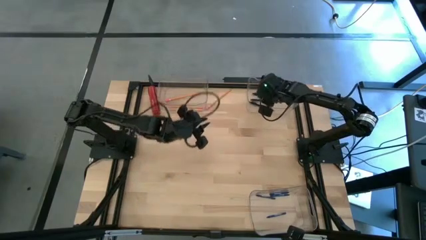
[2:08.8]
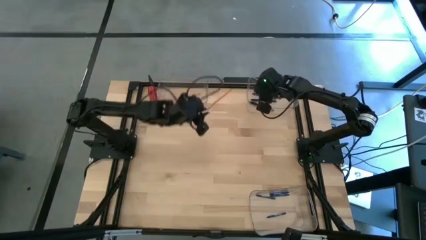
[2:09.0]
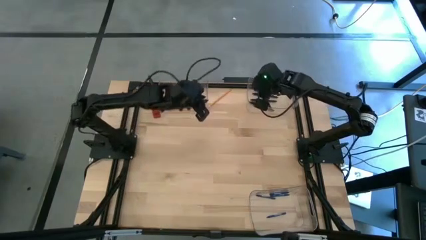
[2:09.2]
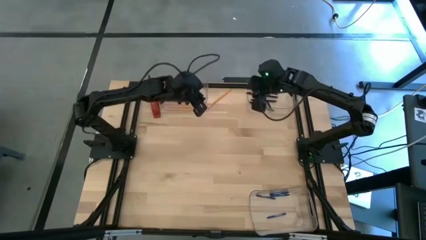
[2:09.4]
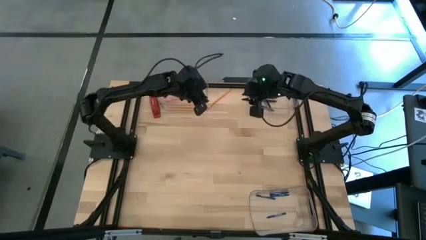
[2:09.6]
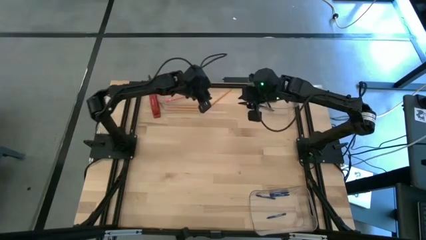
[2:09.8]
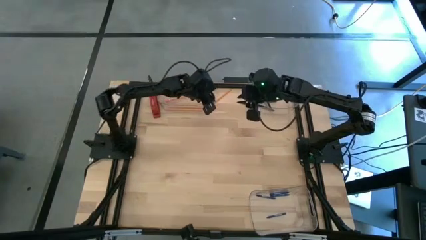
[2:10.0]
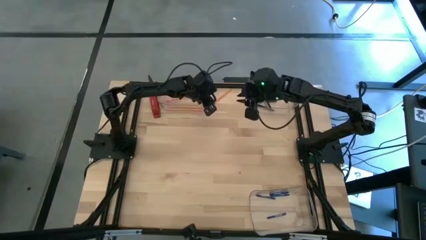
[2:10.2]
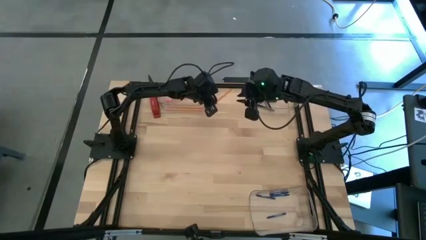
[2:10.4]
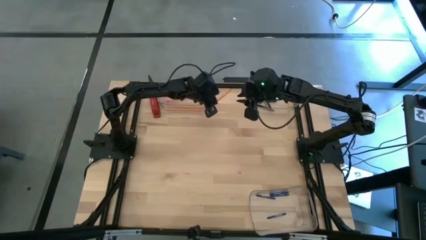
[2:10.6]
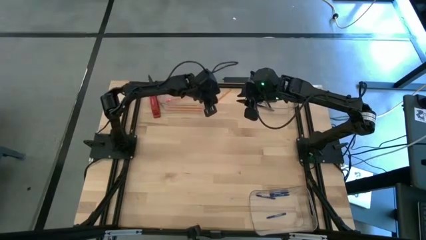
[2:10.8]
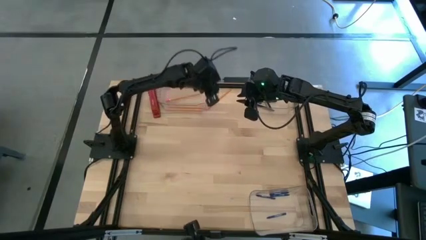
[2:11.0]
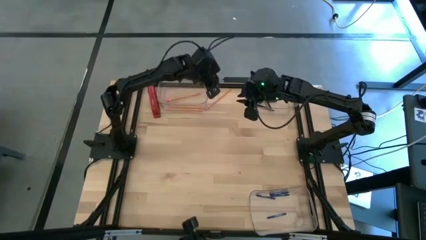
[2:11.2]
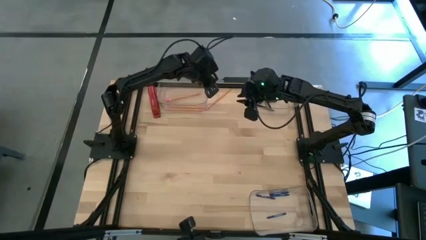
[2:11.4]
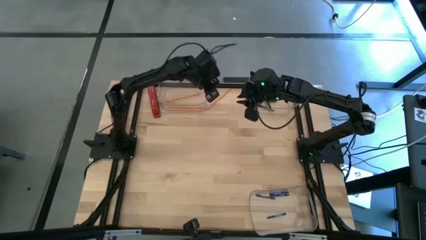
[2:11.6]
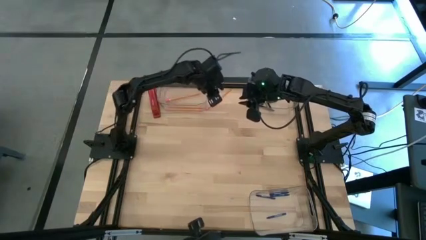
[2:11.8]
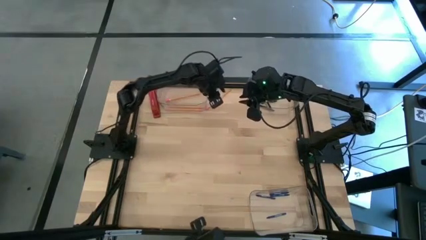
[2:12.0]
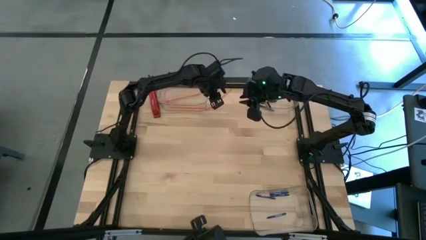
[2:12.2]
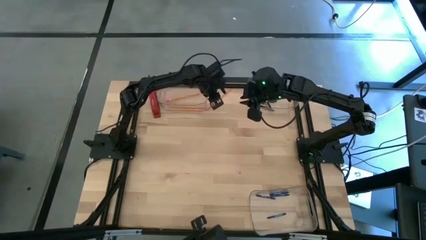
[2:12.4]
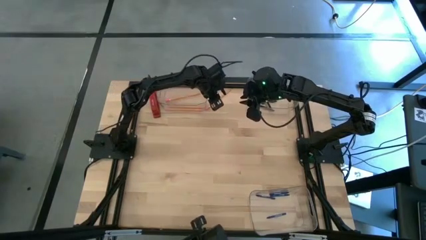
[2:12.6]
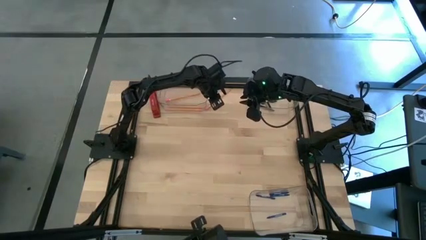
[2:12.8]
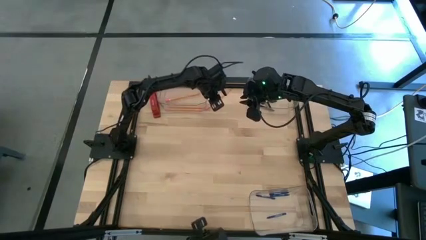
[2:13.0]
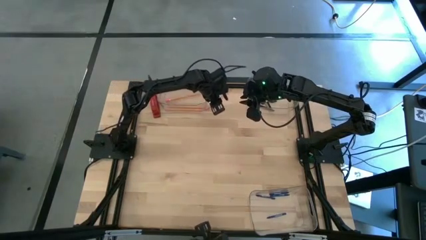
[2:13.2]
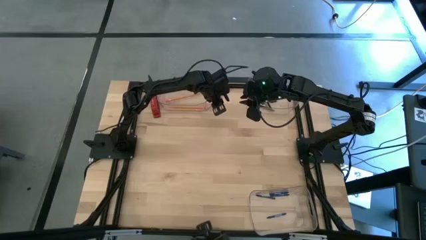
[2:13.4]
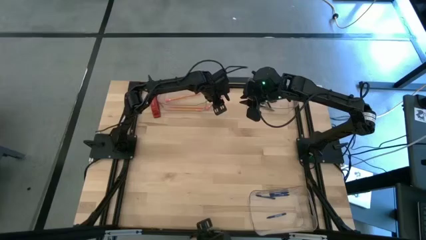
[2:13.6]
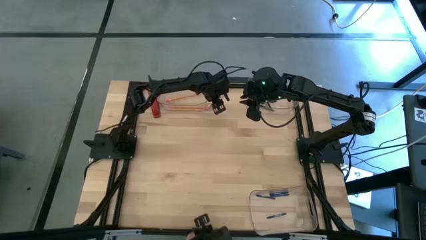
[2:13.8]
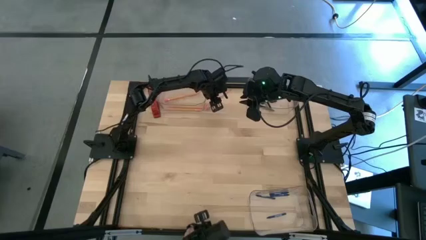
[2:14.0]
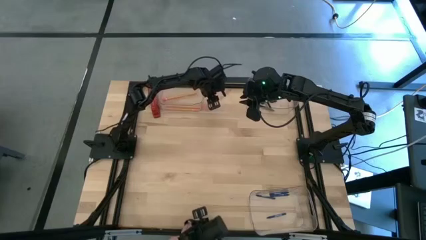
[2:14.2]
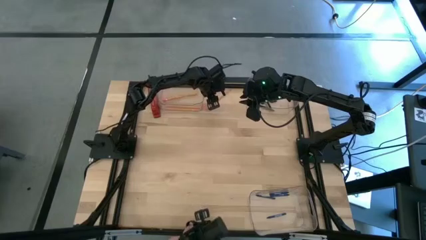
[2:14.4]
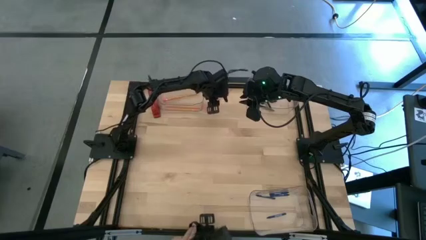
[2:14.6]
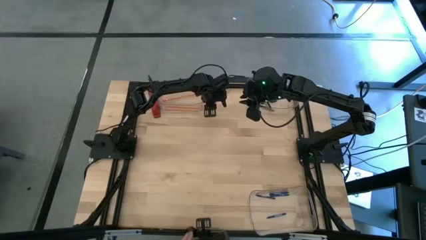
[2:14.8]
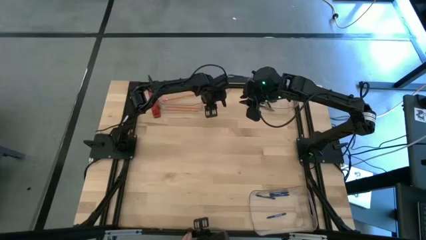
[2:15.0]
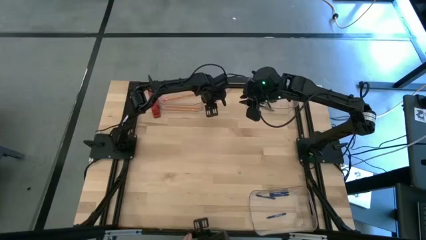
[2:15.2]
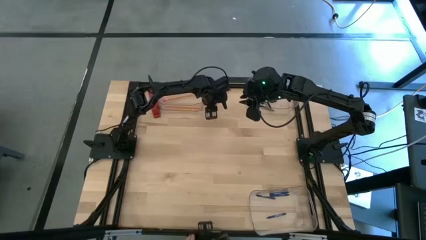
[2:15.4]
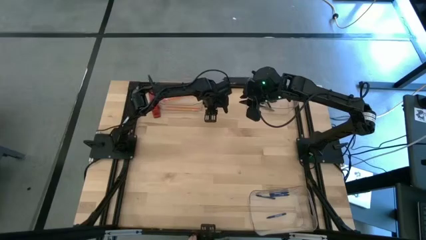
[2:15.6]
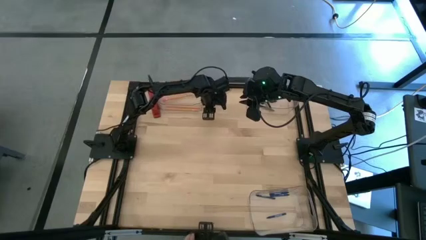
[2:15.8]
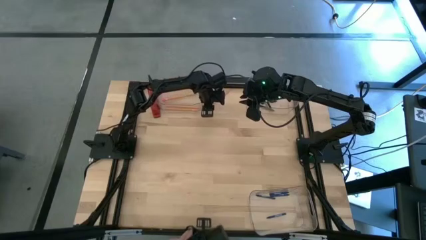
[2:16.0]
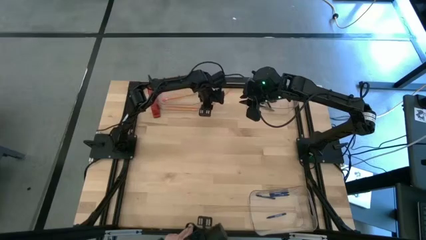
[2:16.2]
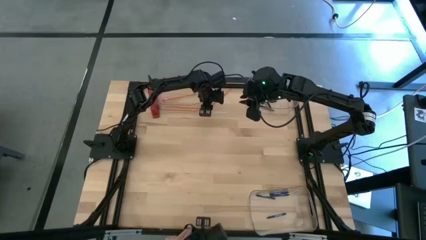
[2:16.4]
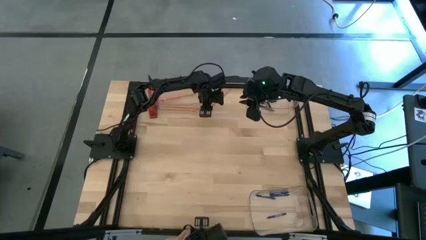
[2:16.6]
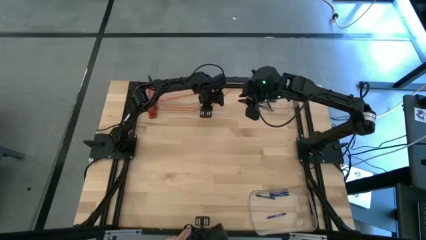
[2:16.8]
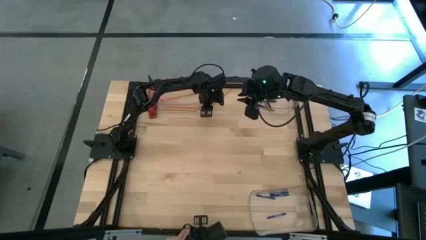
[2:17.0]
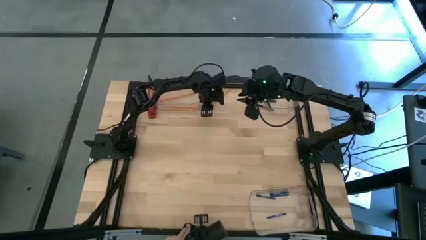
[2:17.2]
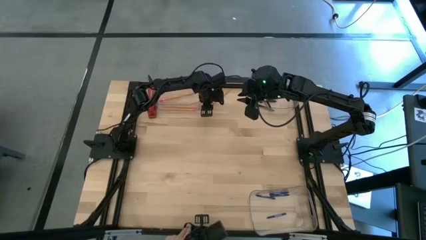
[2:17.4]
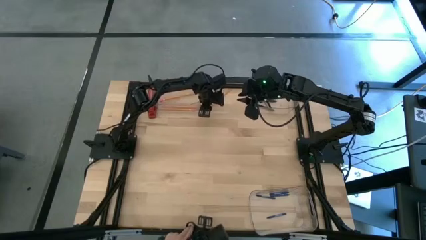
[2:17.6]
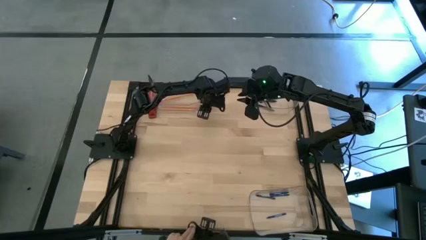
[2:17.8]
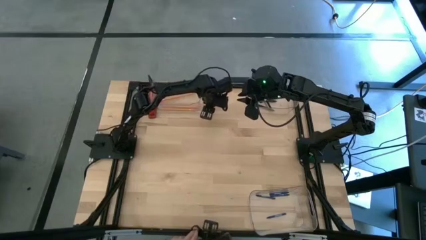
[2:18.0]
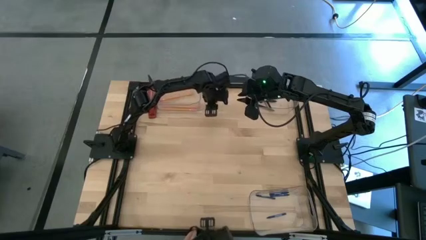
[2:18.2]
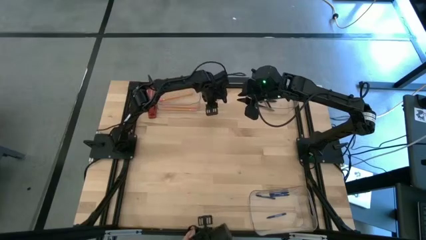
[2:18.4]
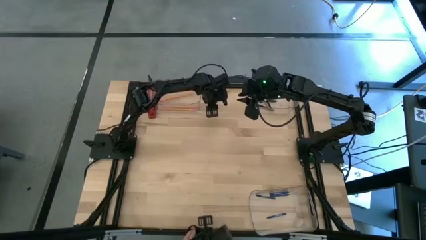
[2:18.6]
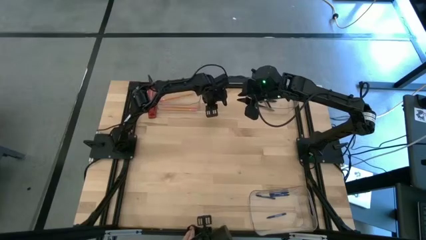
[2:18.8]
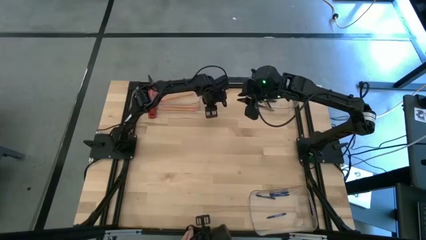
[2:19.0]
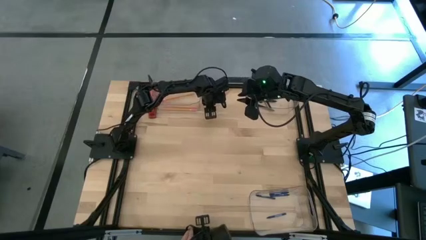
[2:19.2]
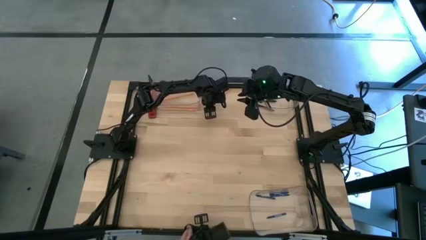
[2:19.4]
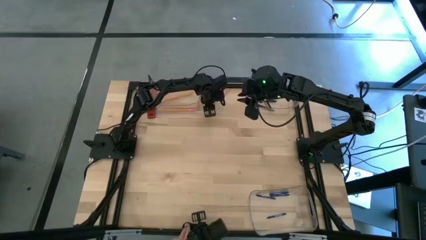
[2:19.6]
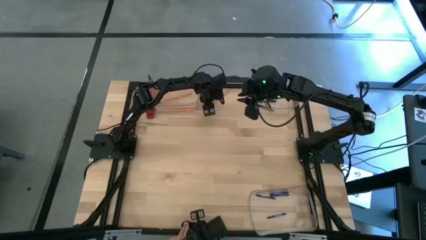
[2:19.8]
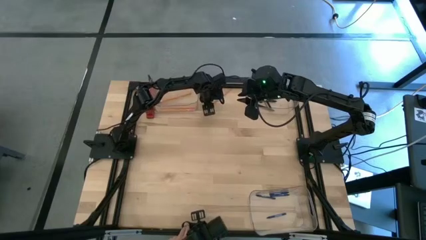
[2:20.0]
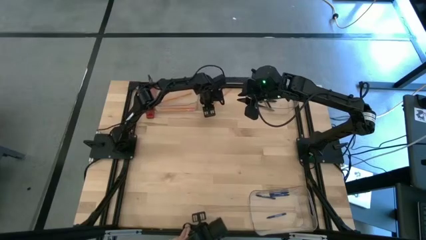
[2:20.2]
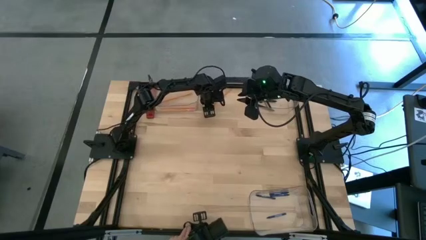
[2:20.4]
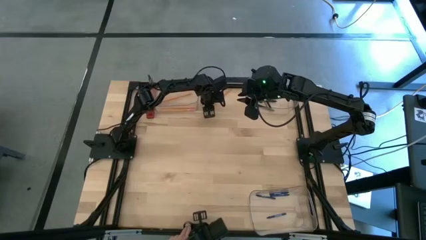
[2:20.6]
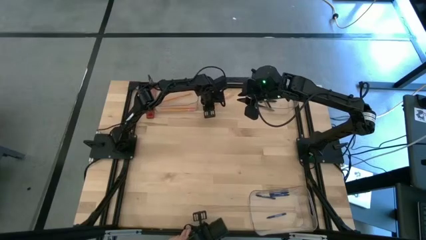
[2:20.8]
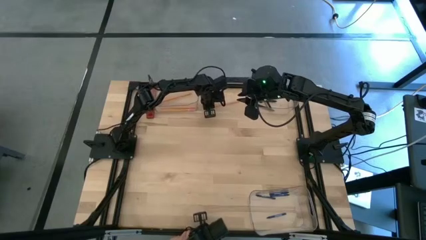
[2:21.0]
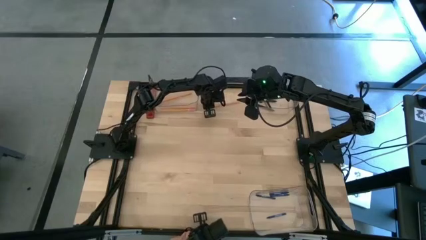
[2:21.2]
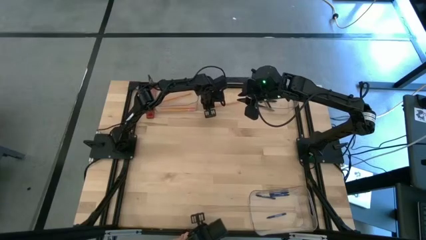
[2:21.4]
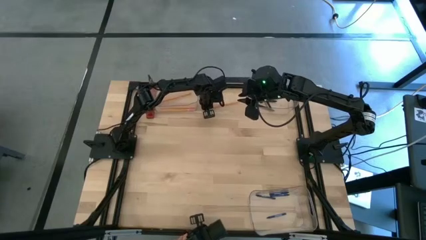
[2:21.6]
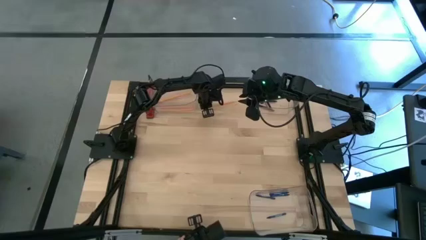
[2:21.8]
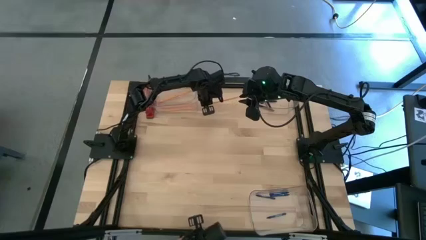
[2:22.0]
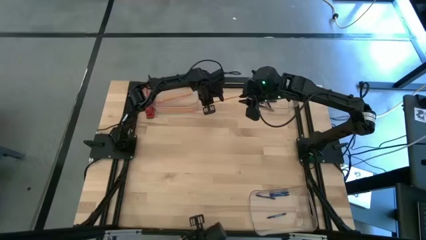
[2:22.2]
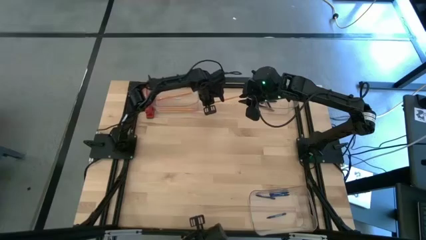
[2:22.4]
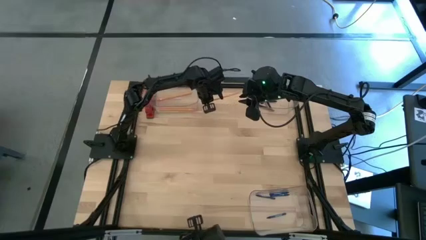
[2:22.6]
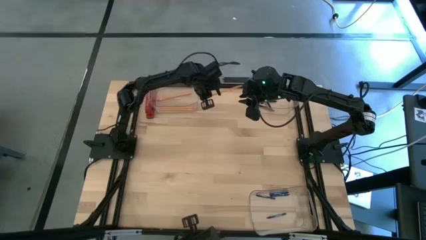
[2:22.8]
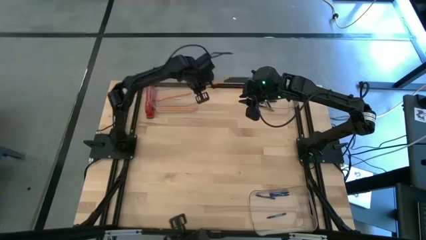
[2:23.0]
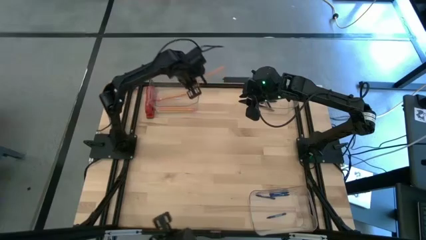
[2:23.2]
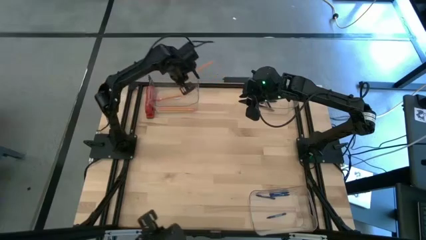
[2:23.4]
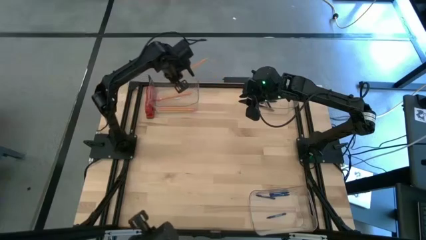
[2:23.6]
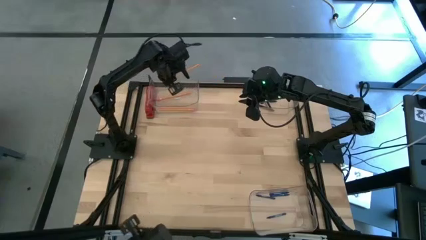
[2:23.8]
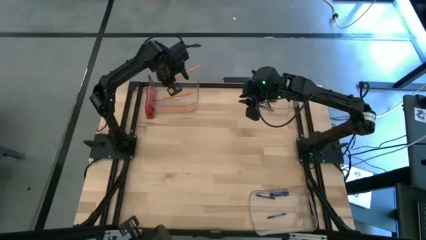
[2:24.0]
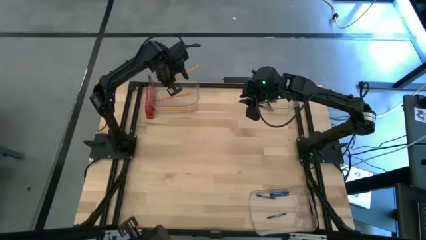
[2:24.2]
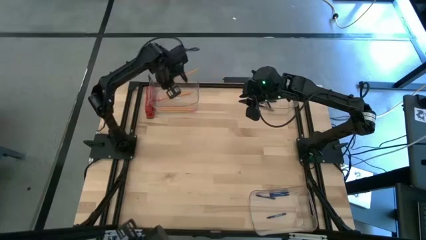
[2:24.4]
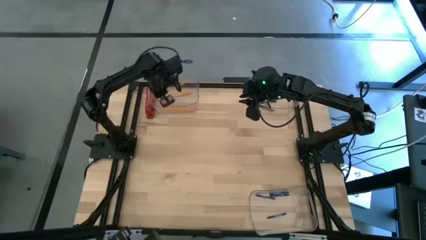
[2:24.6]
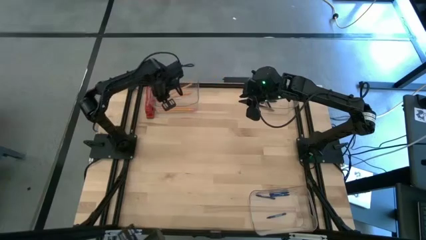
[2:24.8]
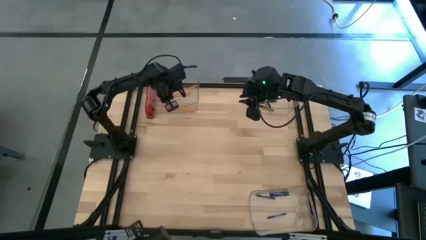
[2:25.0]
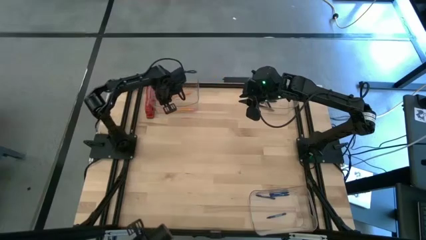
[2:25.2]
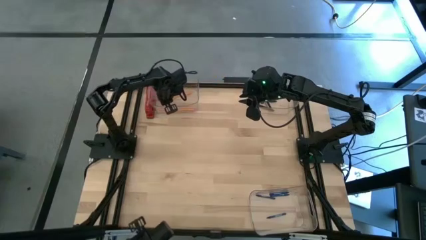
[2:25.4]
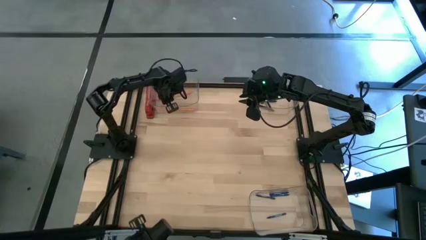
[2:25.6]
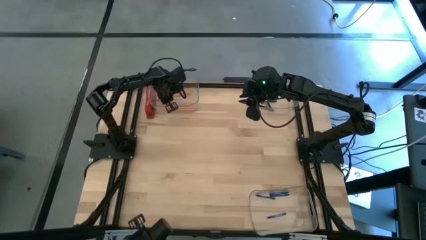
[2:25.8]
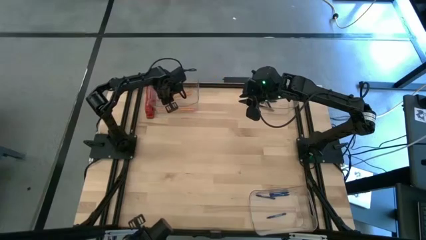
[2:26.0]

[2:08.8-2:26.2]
Task: Sort crayons/erasers/pens/pencils in bins
Put the yellow pencil into the top left transparent bin
